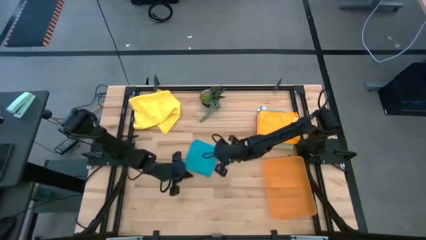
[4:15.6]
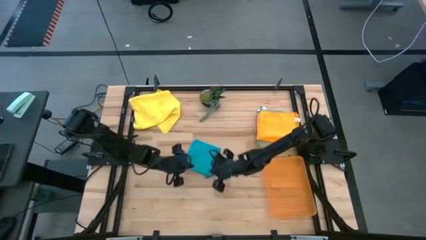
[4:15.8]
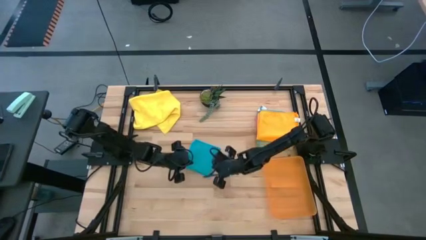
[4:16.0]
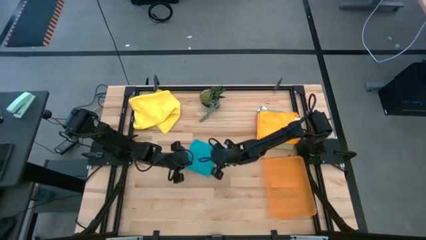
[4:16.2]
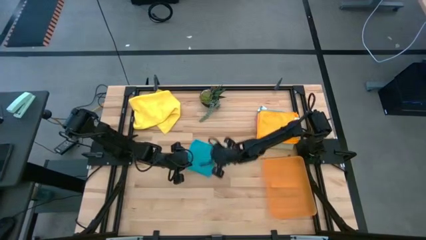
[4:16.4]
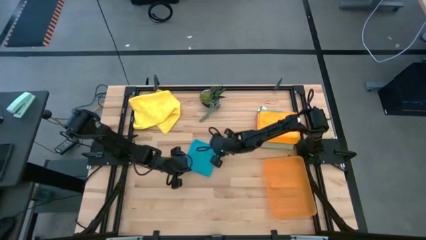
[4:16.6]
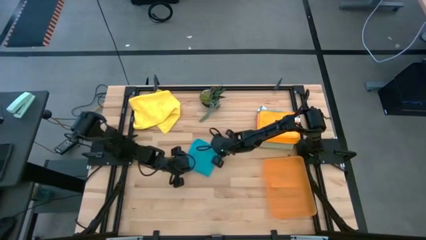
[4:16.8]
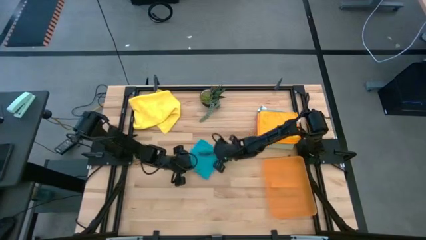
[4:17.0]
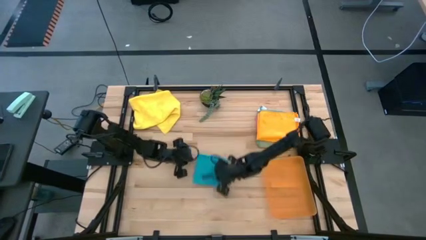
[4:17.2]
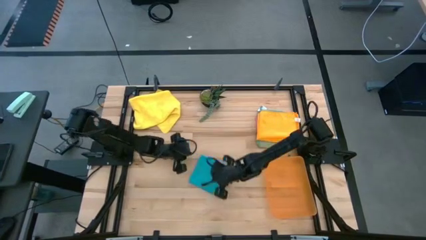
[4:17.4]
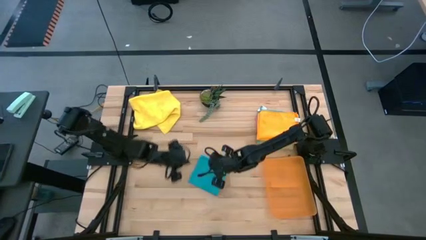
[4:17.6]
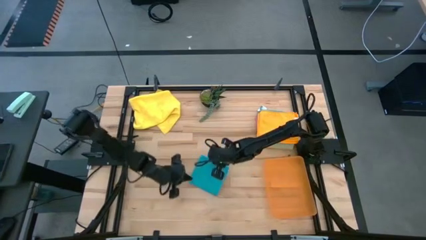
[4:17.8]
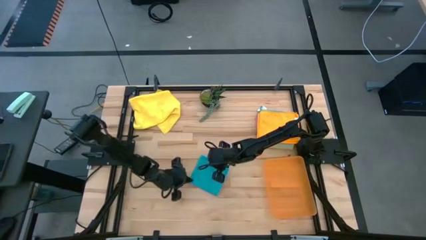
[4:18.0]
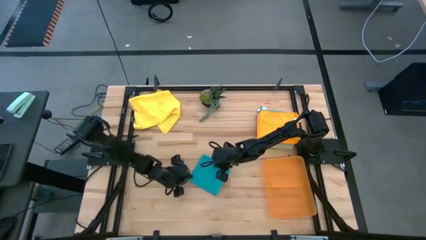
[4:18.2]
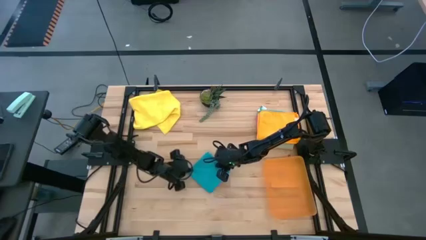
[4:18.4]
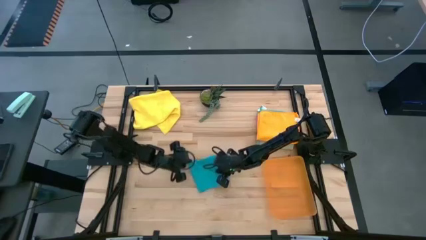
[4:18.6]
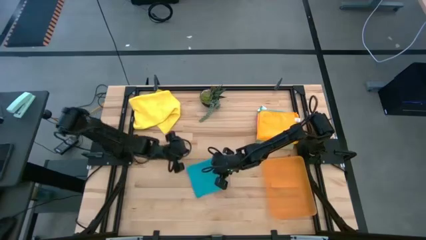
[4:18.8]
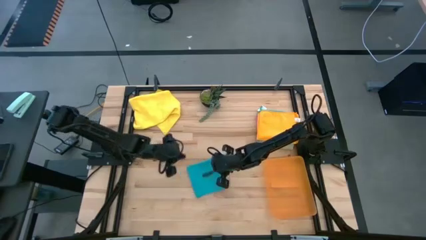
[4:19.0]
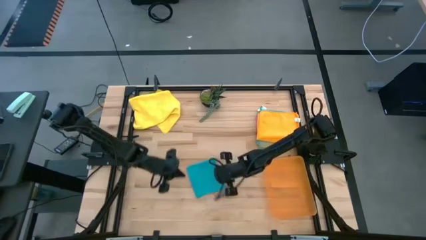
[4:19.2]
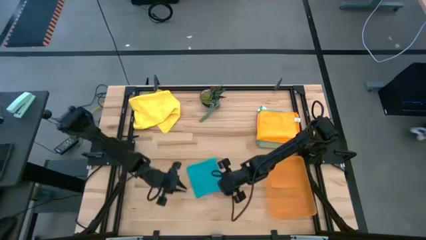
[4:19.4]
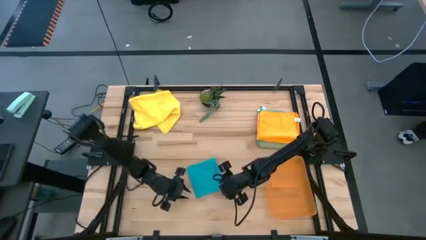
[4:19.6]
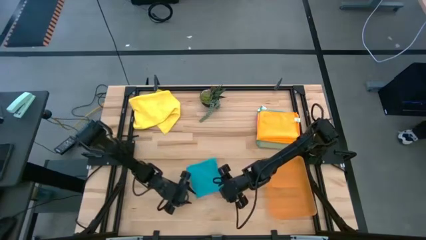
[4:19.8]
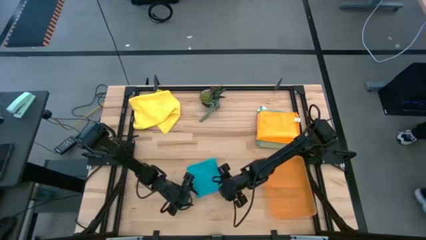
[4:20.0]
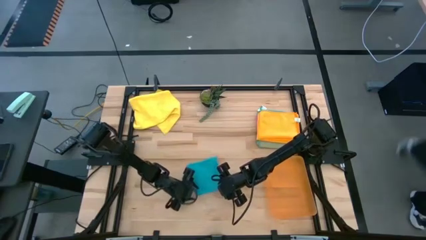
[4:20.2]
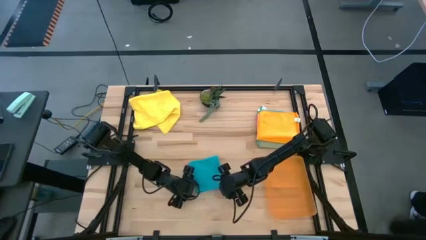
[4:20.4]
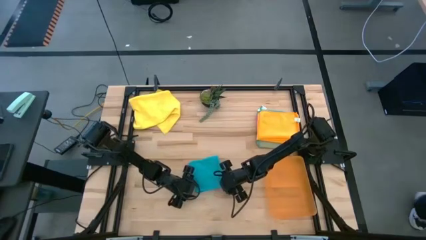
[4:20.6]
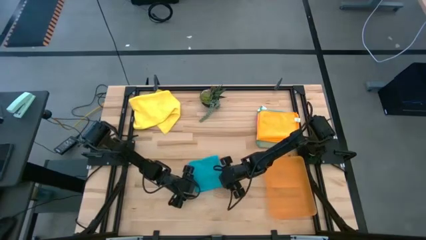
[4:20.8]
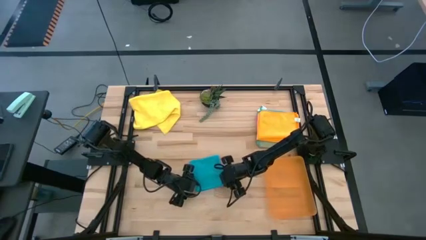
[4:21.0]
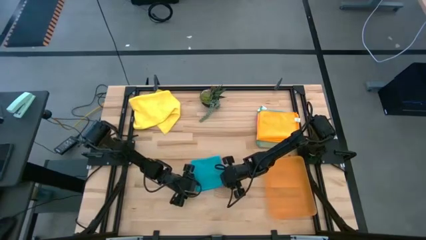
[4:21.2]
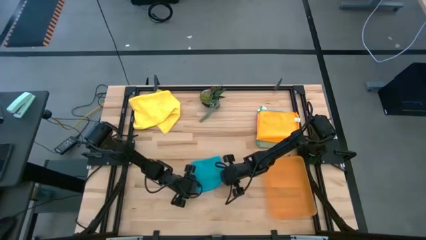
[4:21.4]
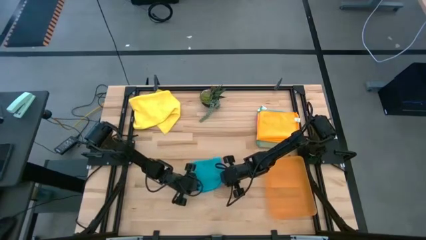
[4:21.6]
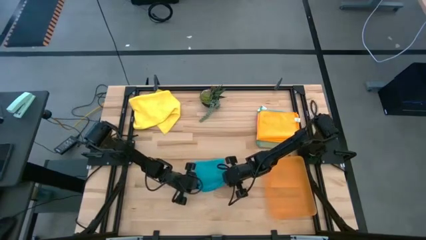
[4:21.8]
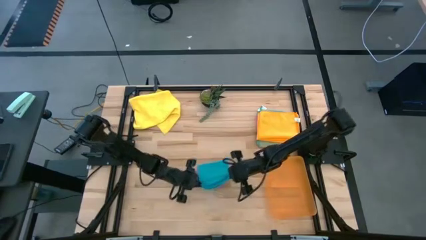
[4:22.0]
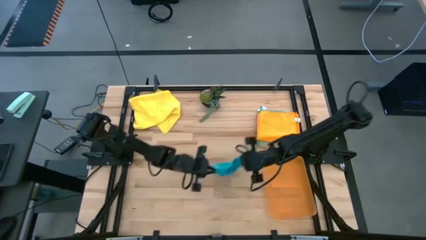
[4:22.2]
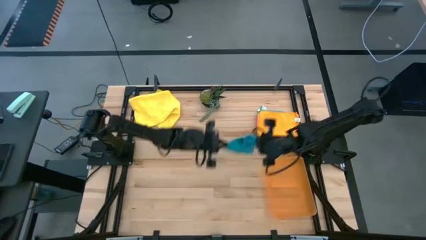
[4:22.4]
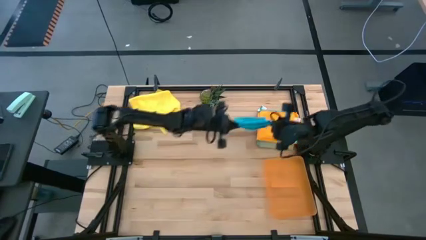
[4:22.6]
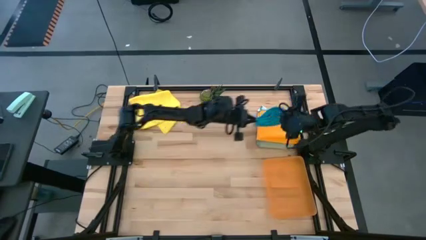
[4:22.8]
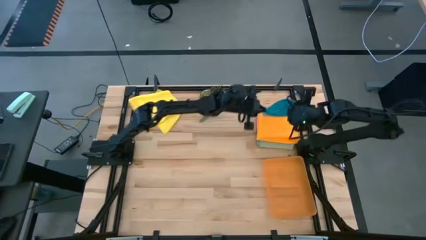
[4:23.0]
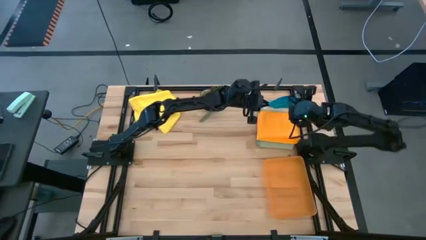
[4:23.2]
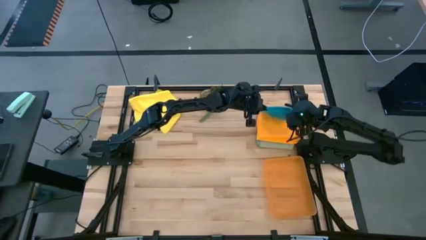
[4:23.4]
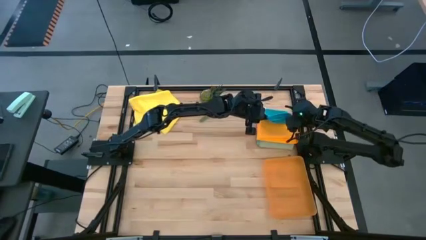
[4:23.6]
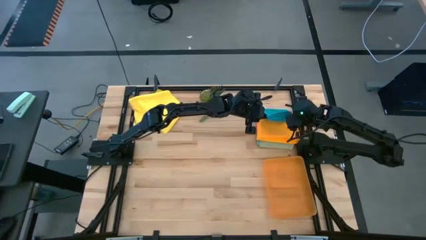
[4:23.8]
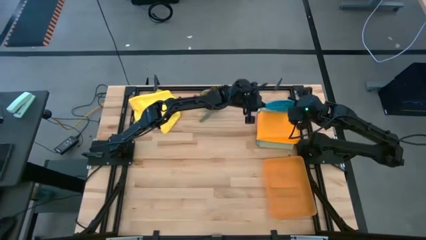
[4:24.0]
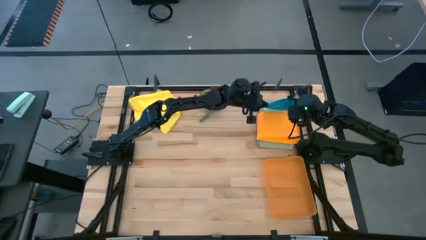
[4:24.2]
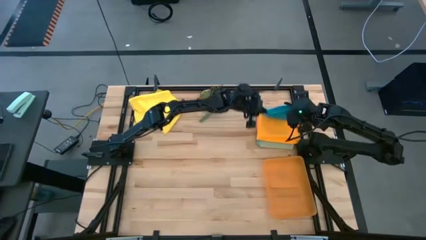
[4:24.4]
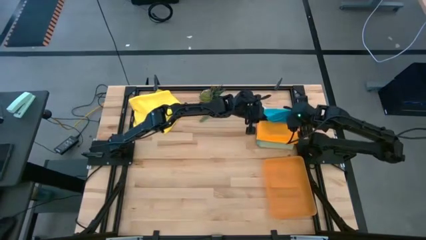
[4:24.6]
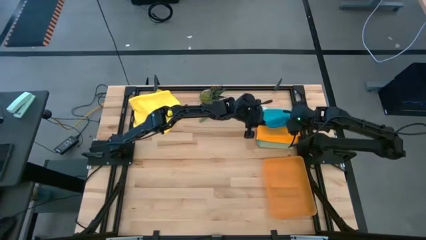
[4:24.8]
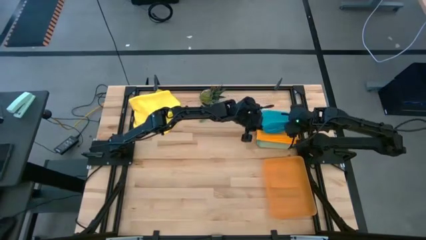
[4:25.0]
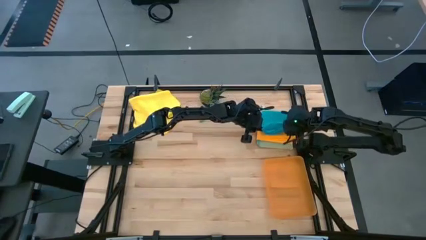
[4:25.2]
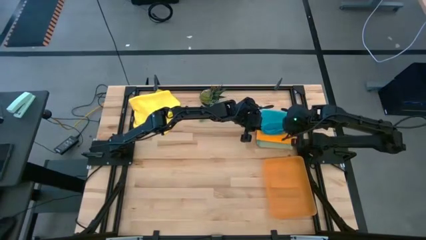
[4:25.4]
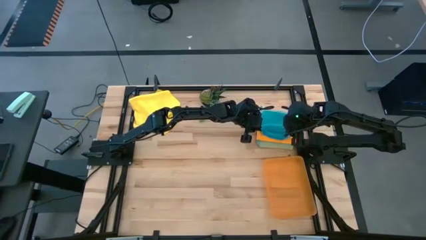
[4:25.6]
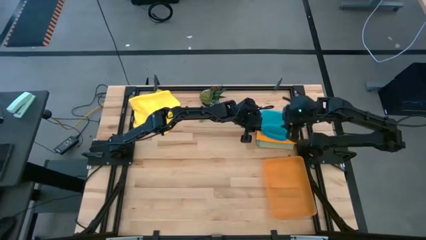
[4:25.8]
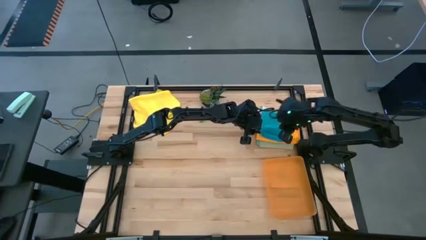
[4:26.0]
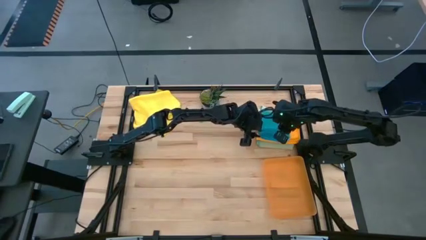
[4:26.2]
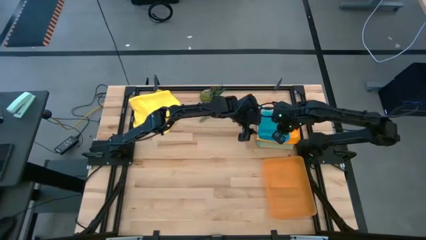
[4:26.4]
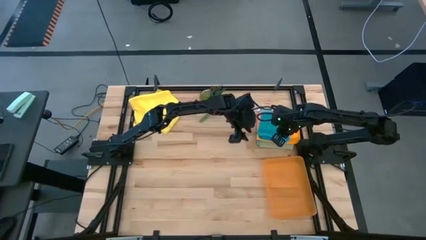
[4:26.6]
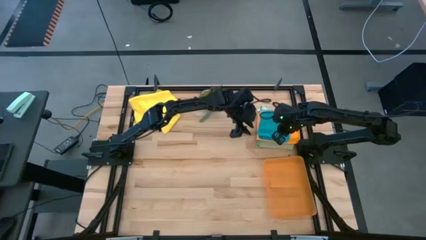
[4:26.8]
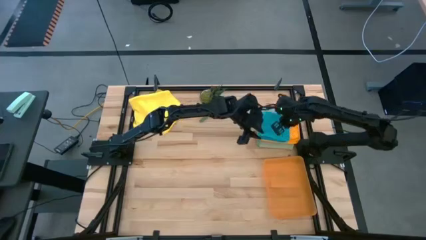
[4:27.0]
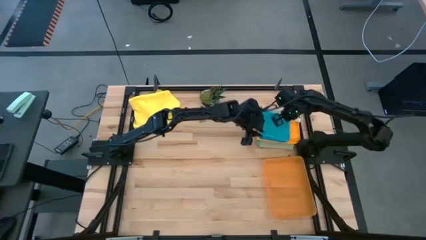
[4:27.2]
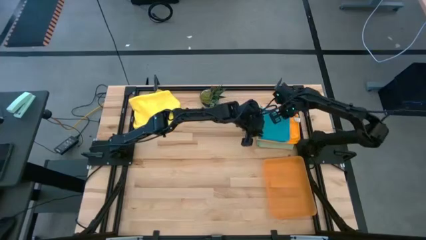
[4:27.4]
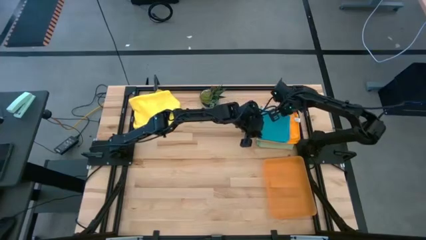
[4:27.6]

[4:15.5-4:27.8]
Task: Fold microfiber towels
Stack the blue microfiber towel on top of the orange microfiber towel

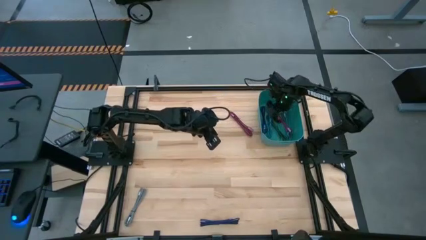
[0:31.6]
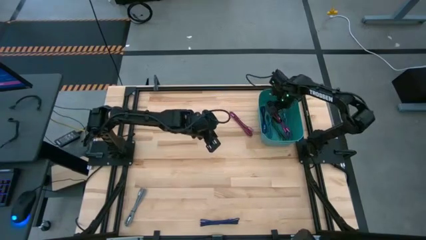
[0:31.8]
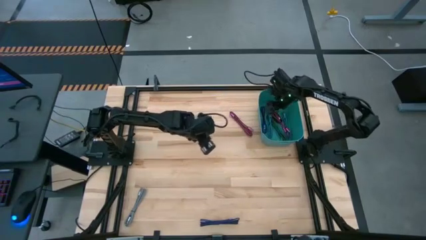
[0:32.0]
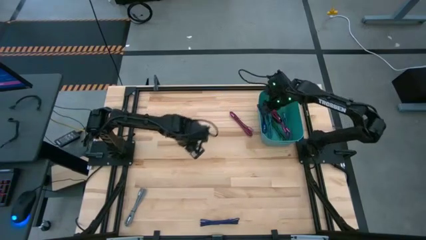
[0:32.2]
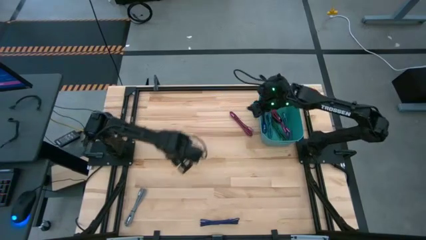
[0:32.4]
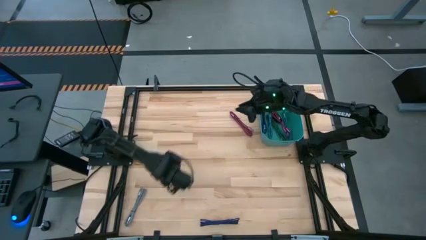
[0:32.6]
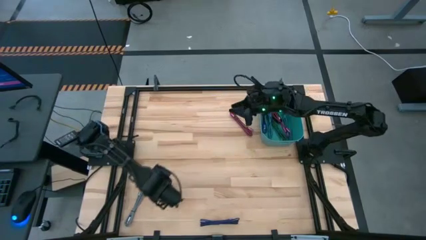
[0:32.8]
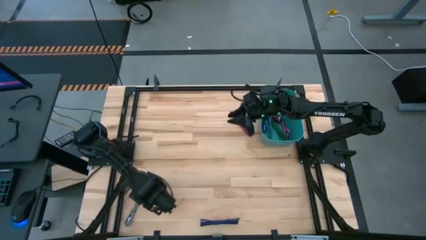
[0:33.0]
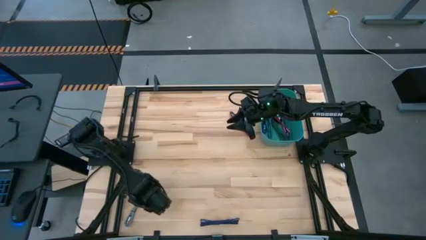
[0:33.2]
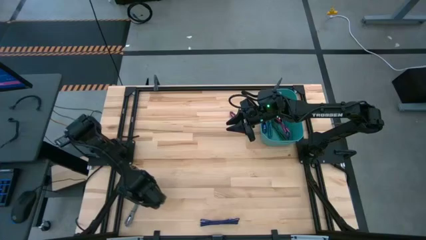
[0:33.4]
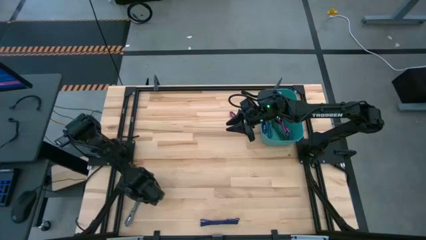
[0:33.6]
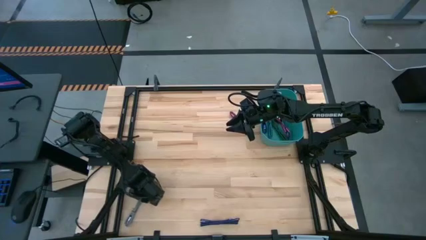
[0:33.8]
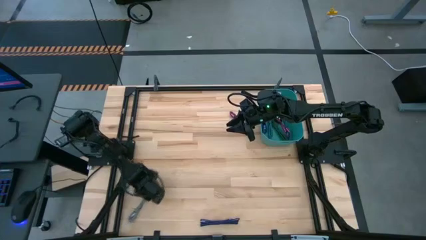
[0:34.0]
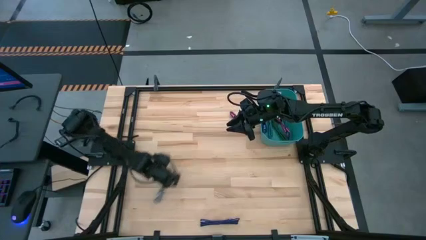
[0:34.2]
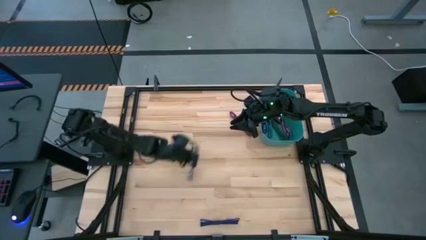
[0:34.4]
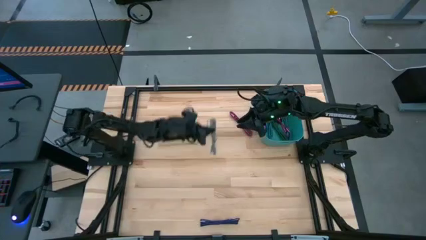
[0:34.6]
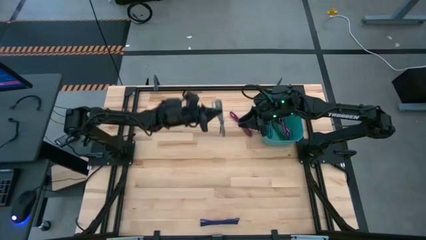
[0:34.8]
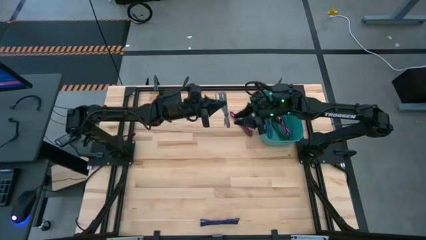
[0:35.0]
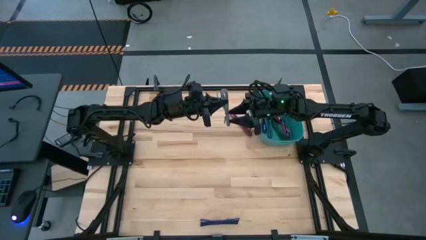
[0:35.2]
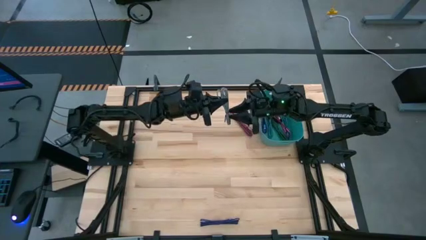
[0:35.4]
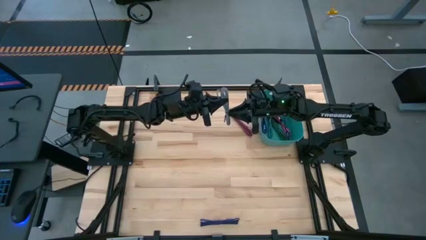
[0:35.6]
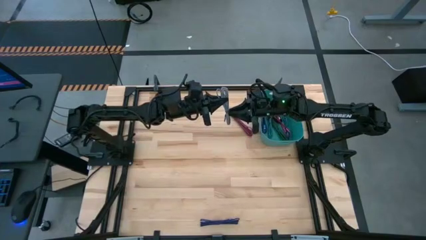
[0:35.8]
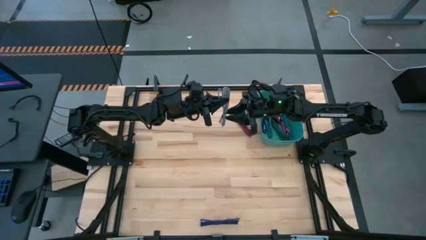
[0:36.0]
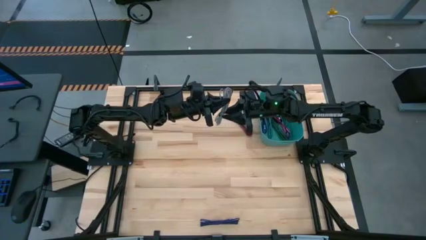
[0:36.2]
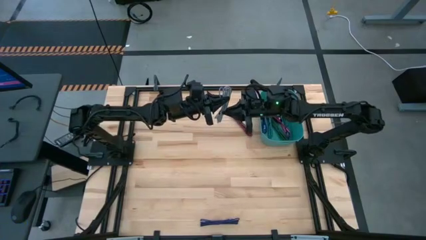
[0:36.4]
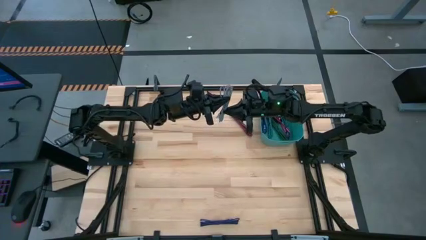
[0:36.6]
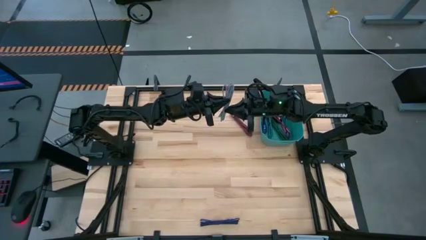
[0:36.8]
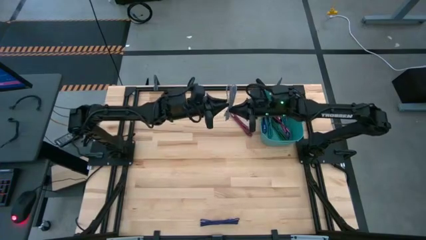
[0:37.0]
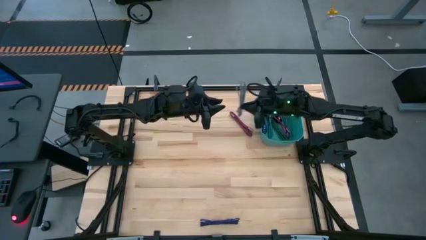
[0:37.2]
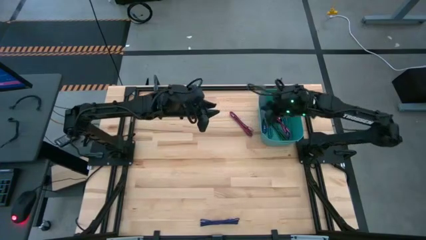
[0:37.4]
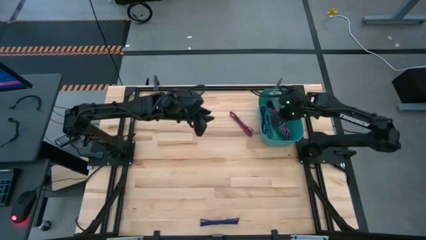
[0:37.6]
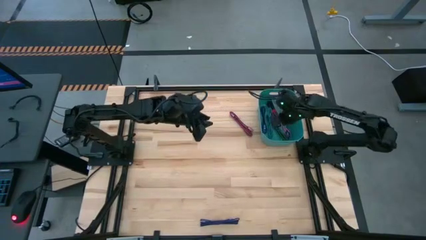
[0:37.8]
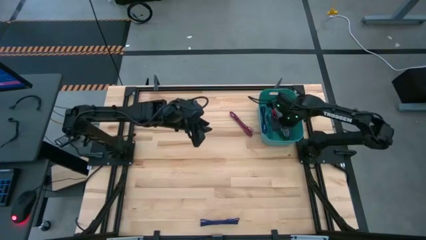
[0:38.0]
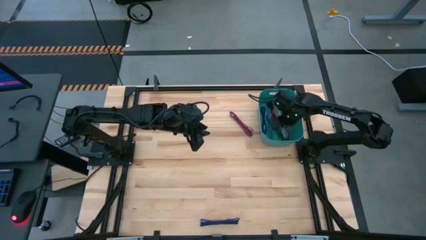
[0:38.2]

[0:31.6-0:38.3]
Task: Pick and place USB-C Cables
Put the white charger cable into the green bin
